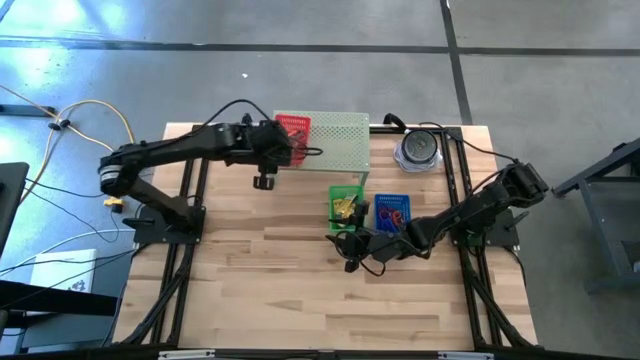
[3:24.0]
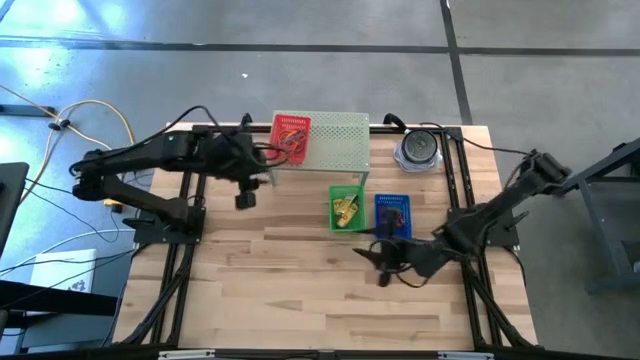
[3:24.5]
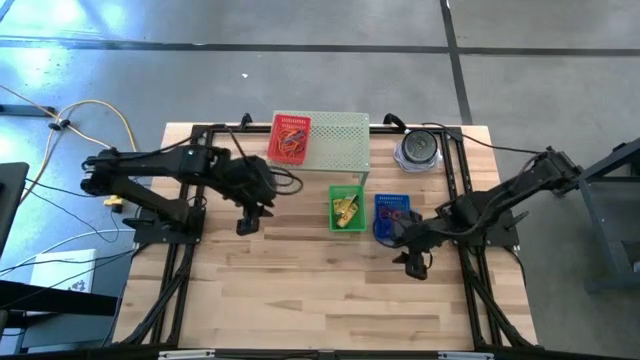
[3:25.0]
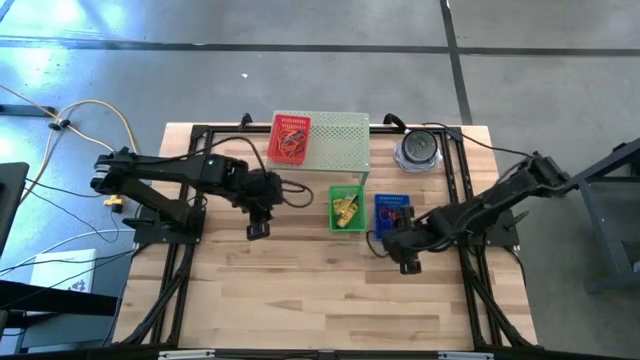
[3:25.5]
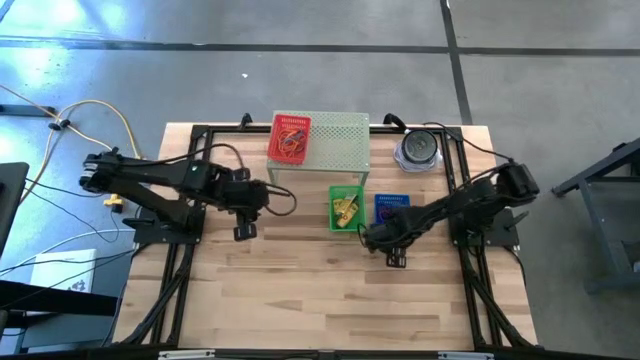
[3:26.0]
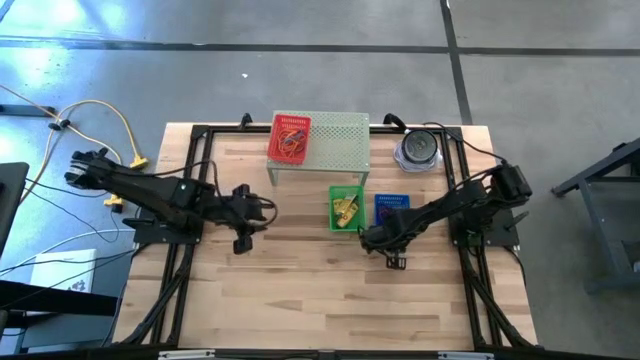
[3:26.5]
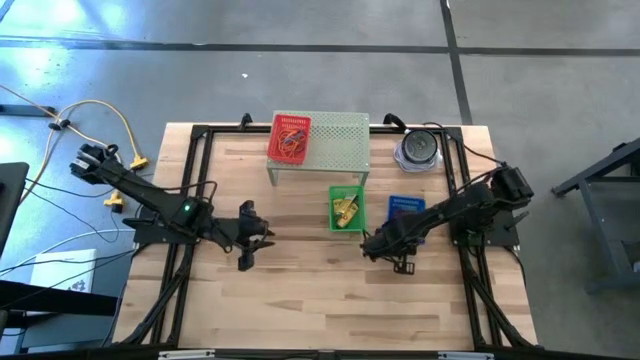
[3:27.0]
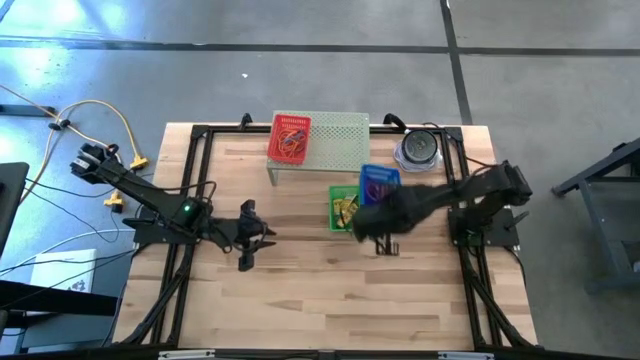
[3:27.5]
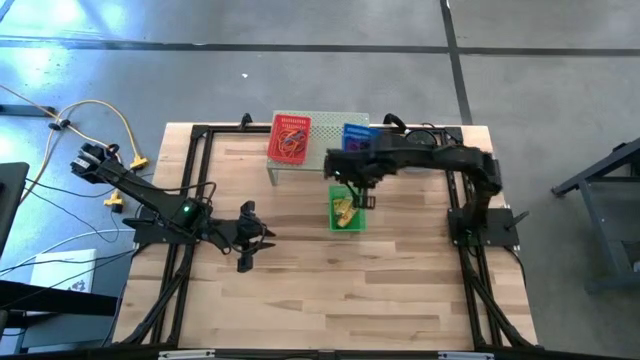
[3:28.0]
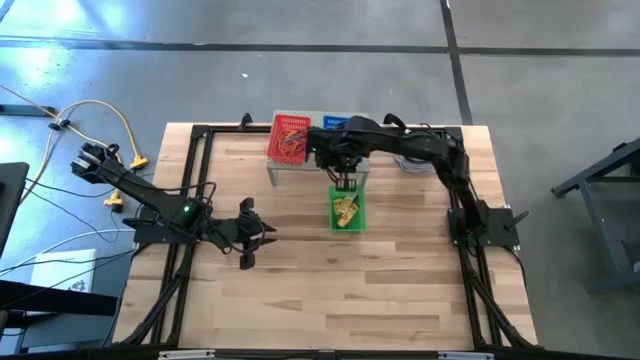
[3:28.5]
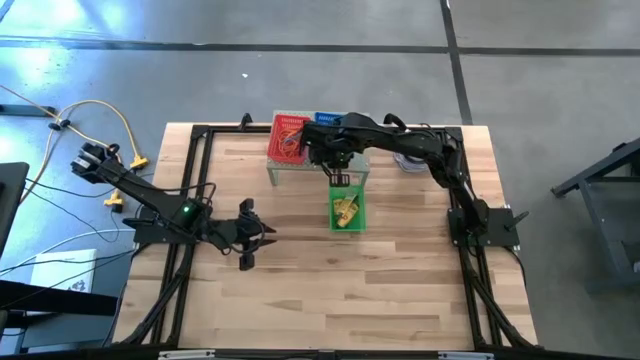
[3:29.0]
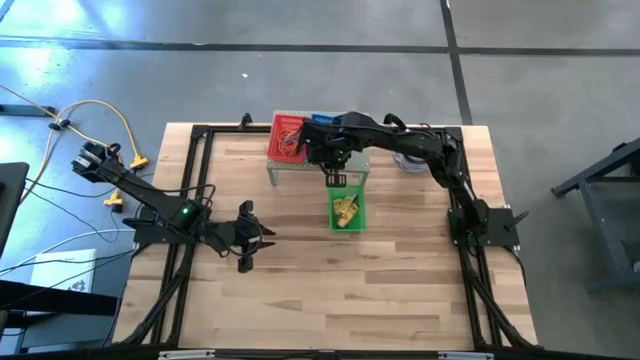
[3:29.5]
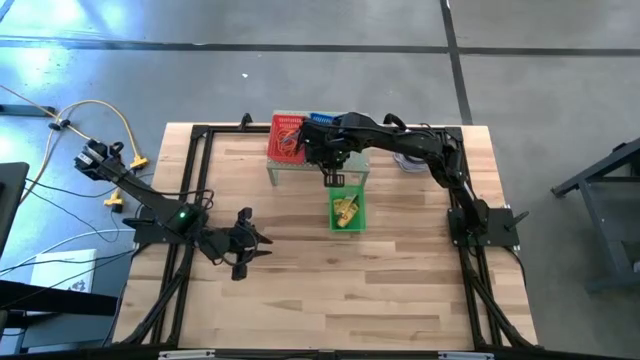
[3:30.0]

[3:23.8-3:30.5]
Task: Pick & Place Office Desk Supplies
Put the blue bin on the shelf

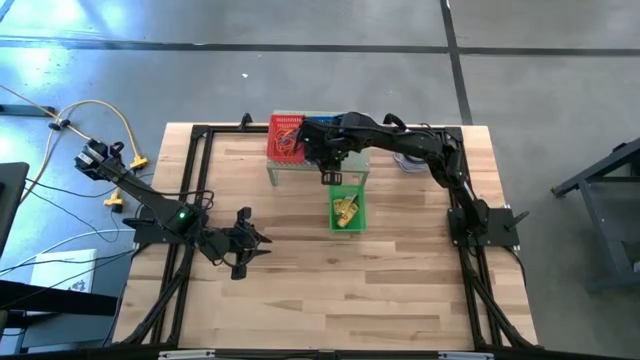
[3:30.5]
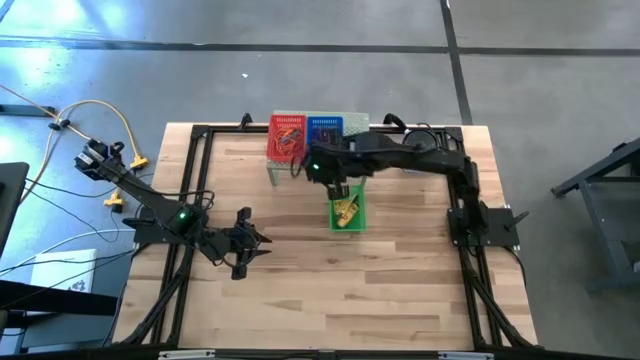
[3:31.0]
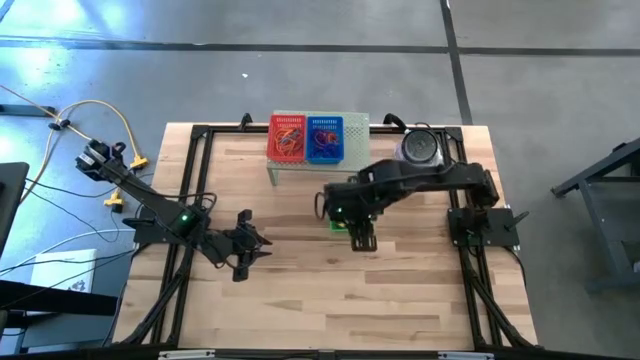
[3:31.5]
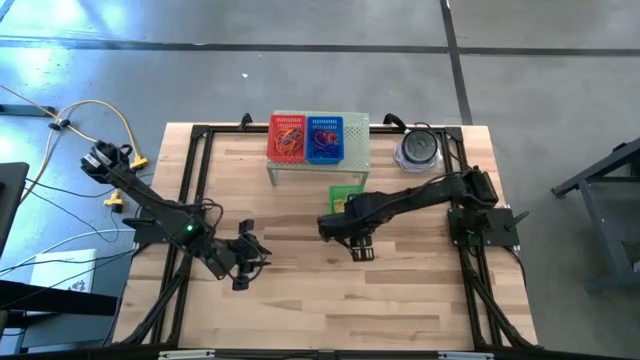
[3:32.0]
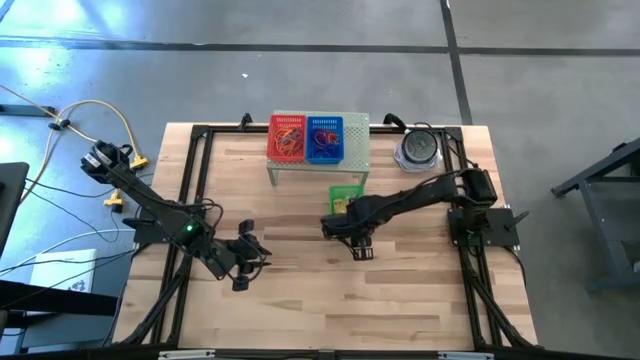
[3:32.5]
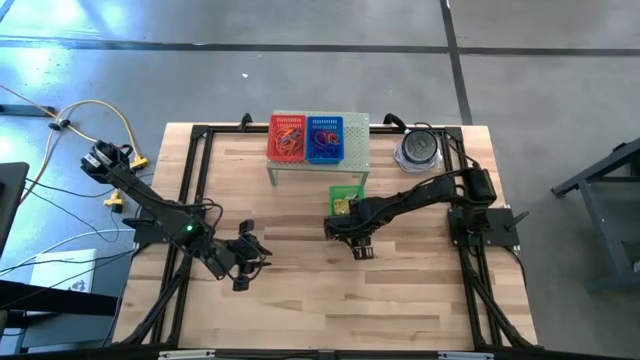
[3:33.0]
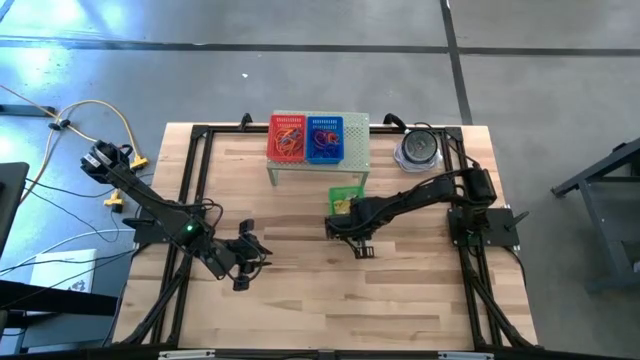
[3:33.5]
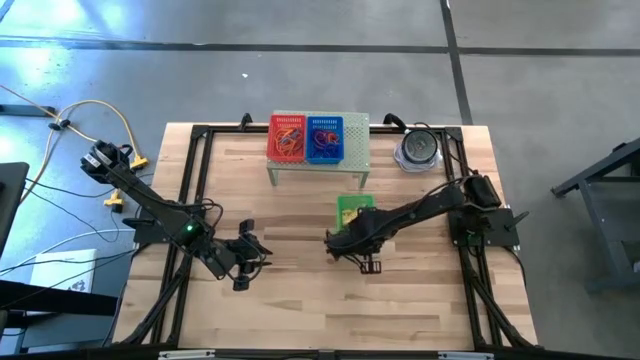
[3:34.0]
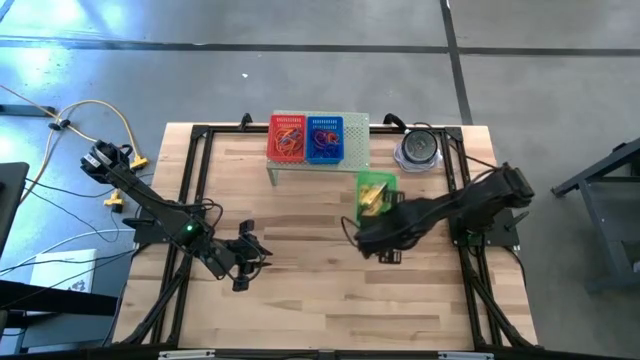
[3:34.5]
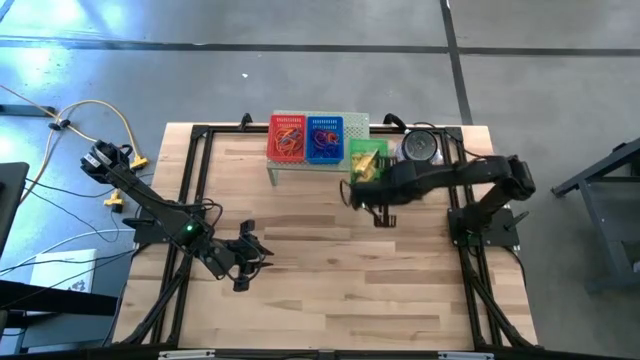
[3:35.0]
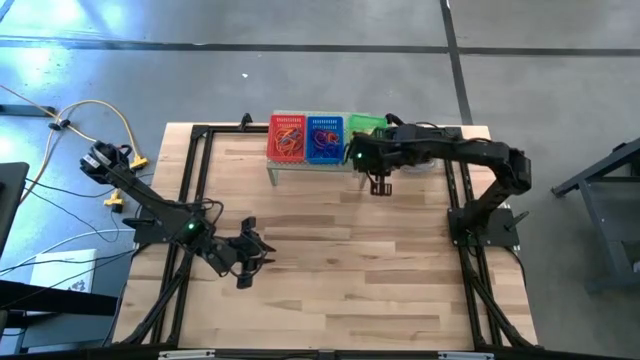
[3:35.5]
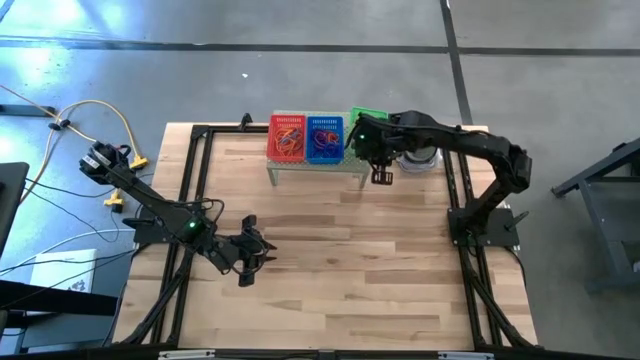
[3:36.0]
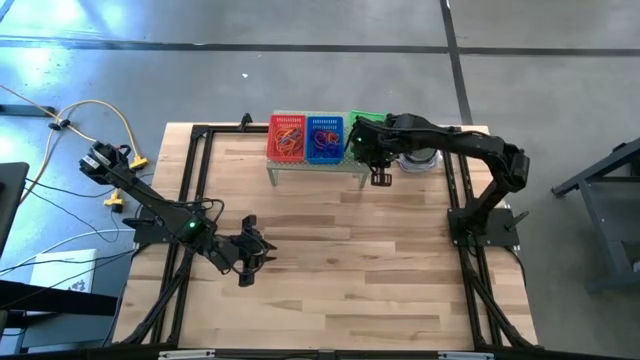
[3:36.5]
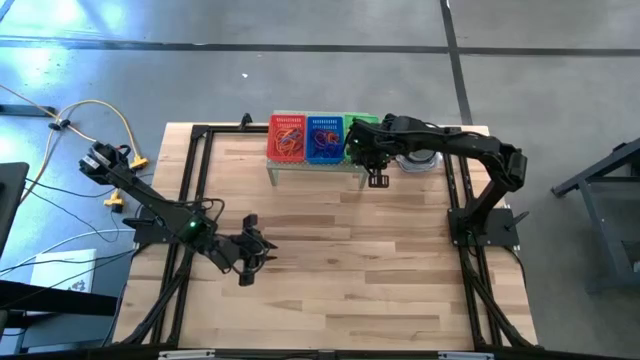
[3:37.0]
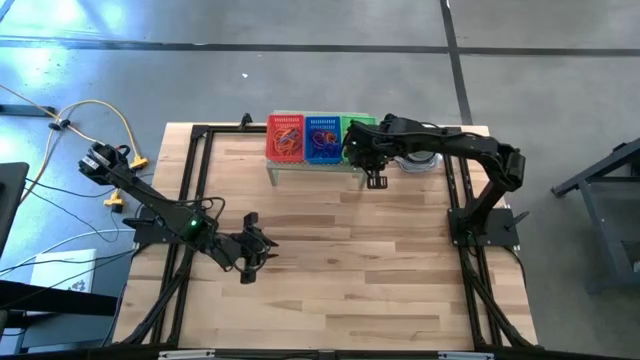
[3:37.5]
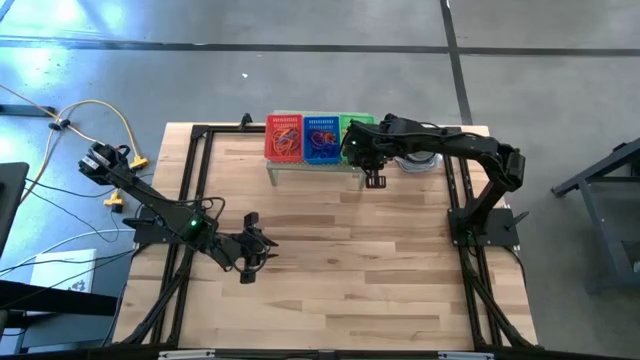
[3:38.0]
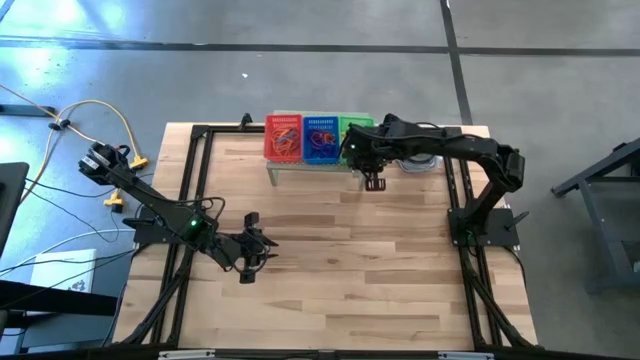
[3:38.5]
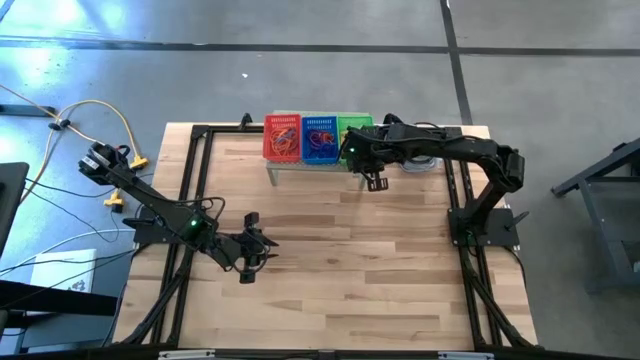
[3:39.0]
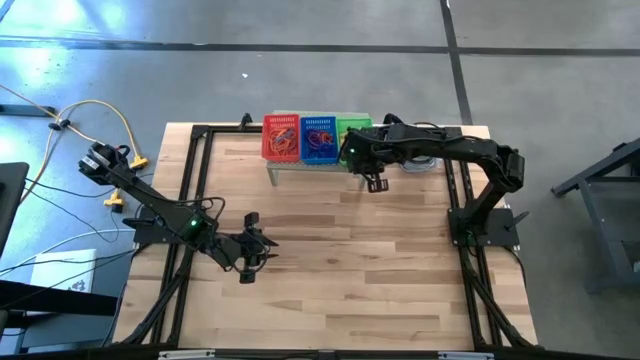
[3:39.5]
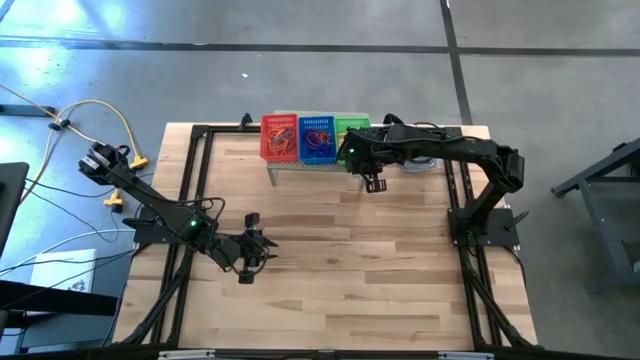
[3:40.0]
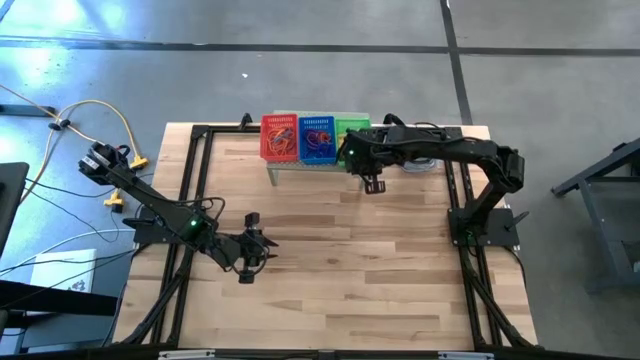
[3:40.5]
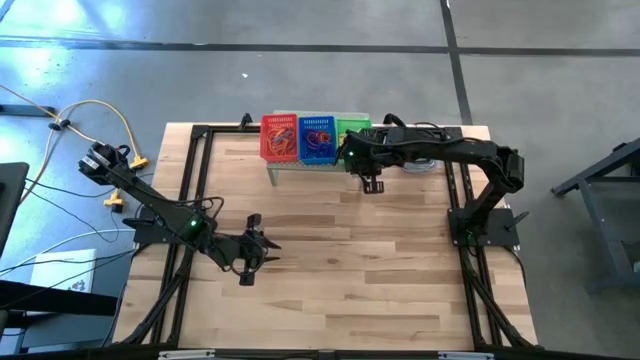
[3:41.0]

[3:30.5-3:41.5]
Put the green bin on the shelf

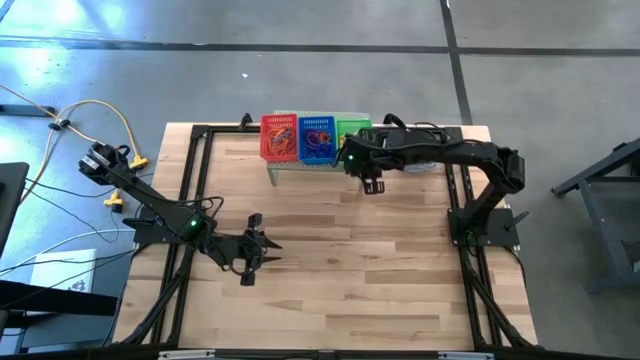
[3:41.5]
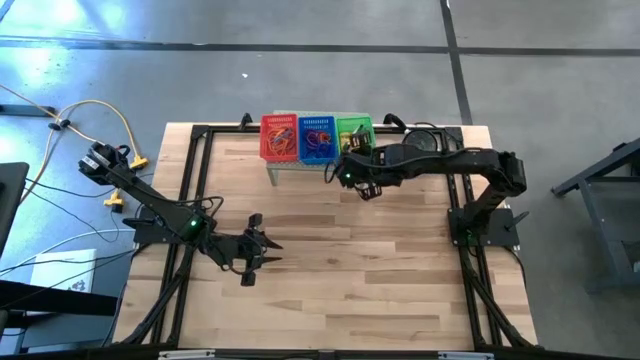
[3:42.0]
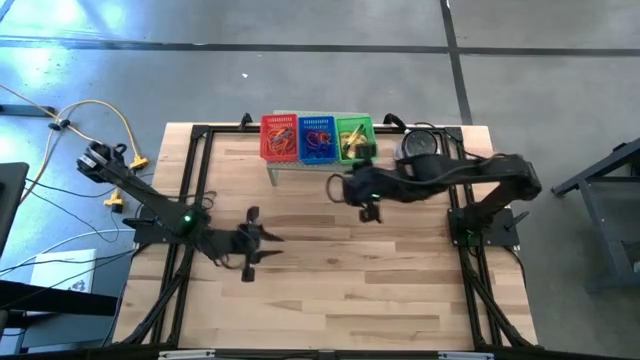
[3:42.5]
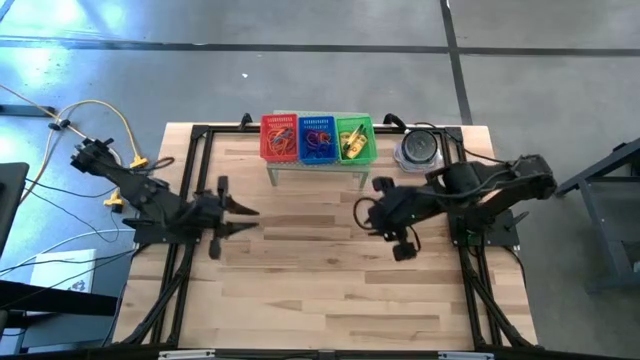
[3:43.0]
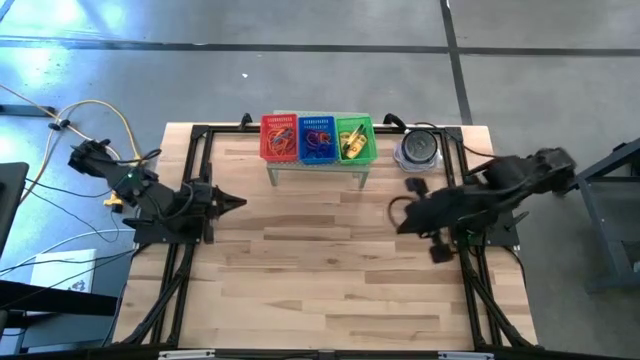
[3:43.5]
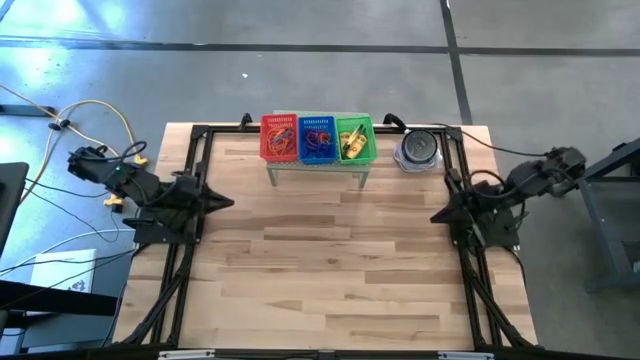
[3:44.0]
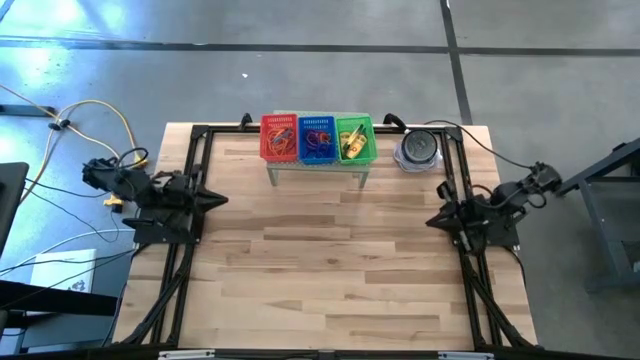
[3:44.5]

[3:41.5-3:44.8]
Return to Home Position

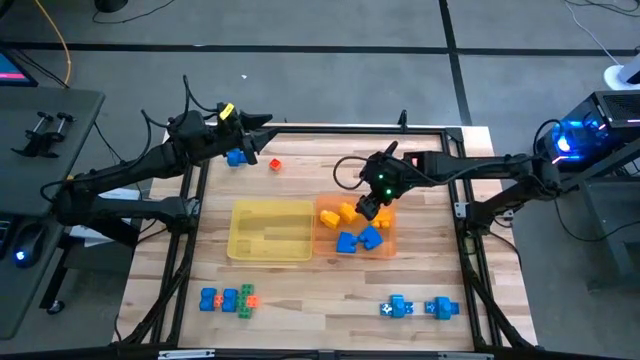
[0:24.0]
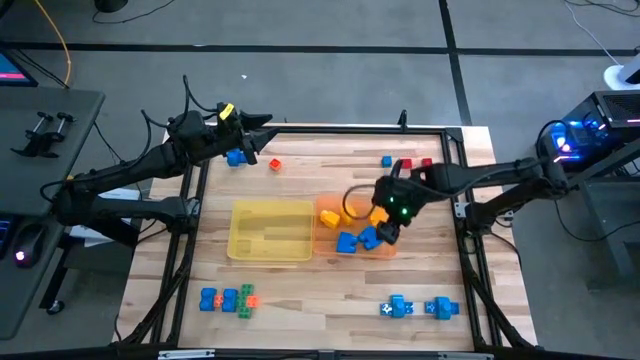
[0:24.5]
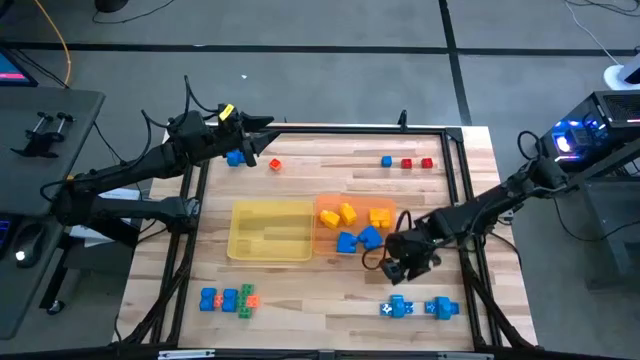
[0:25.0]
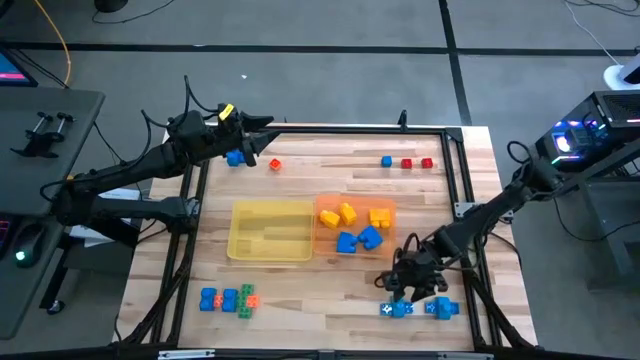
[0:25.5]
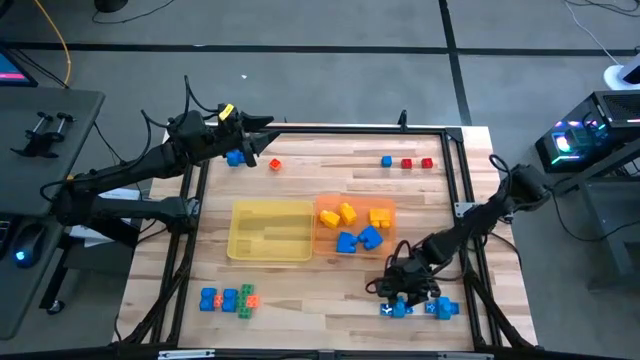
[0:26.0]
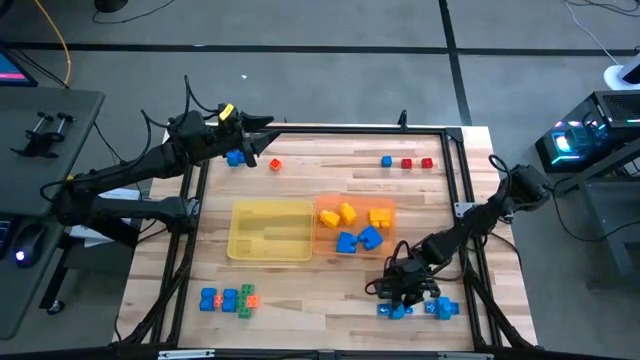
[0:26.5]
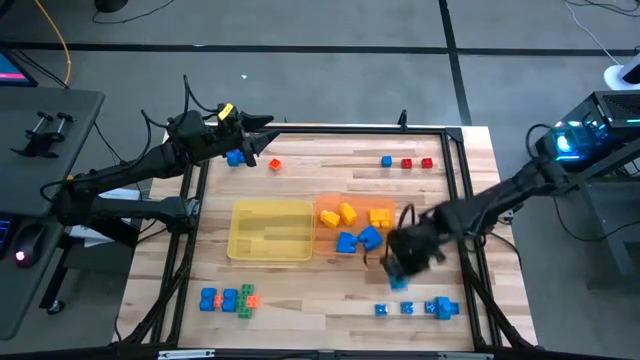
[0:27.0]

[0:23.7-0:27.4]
Task: Sort blocks by size
Put the large blue game piece into the orange bin
